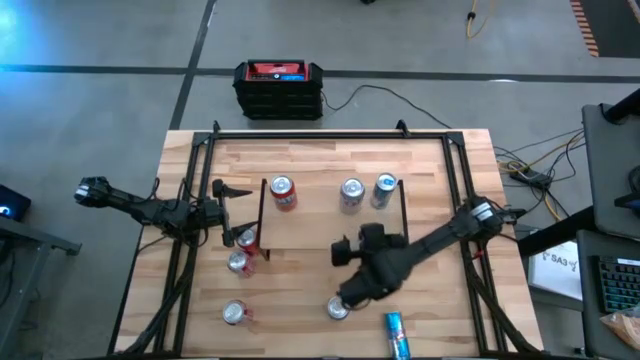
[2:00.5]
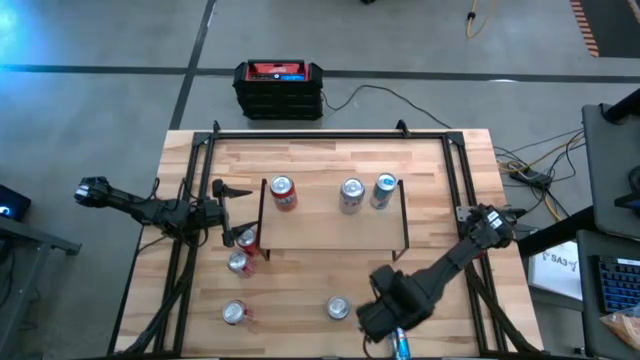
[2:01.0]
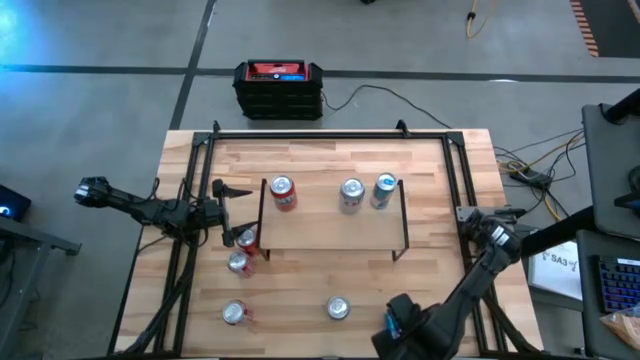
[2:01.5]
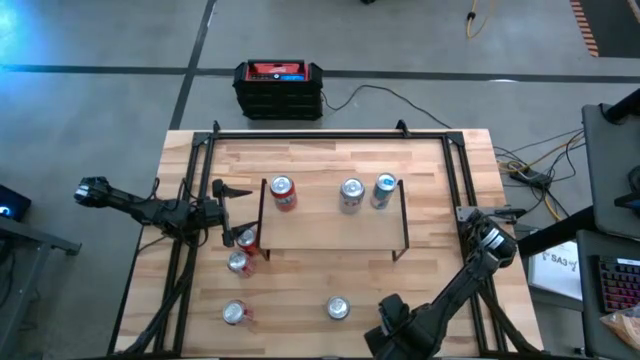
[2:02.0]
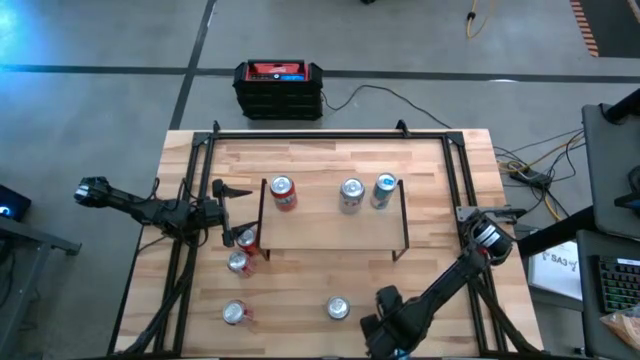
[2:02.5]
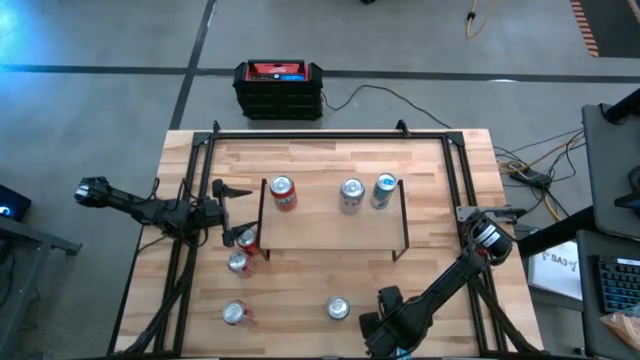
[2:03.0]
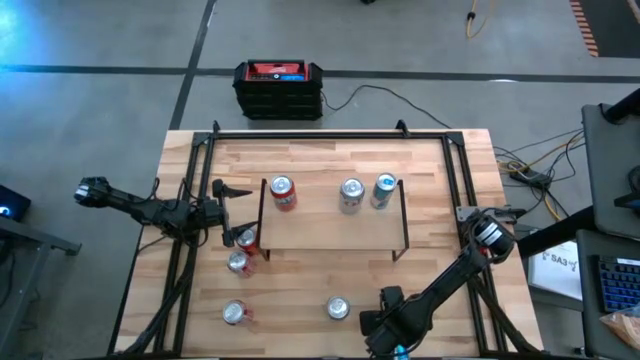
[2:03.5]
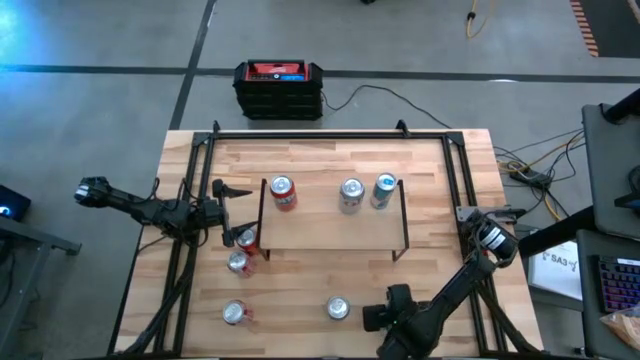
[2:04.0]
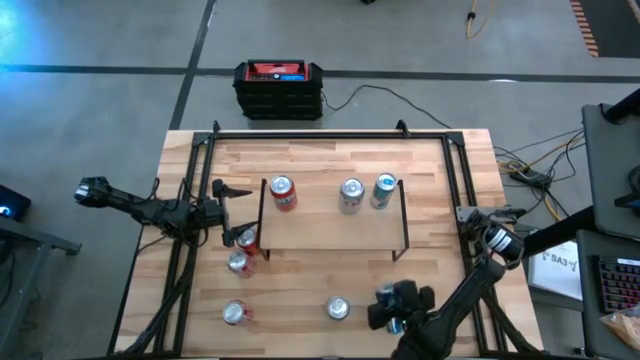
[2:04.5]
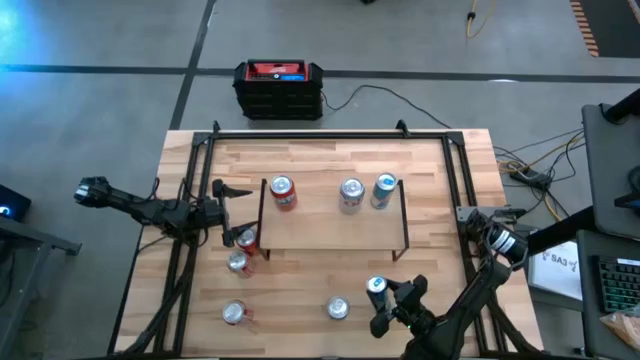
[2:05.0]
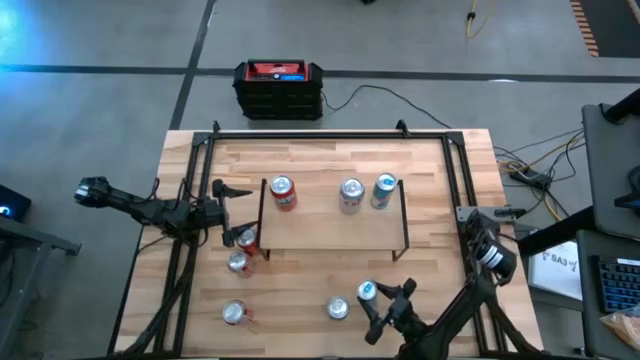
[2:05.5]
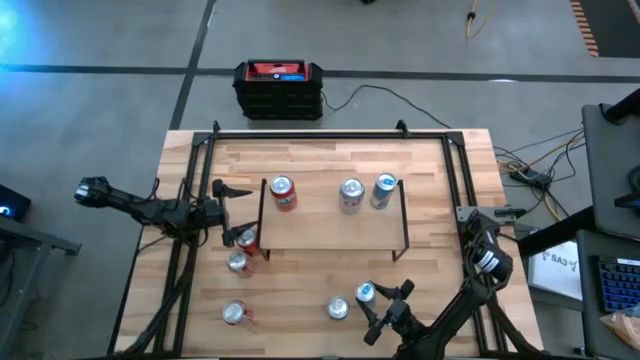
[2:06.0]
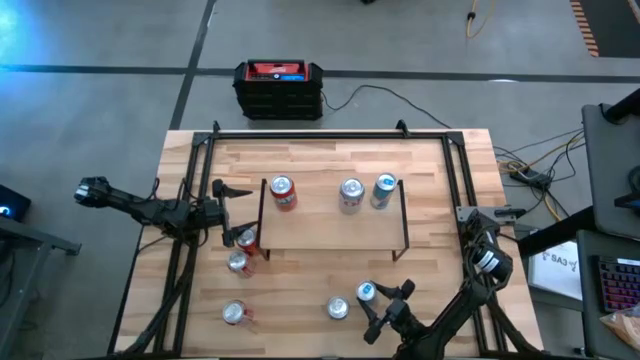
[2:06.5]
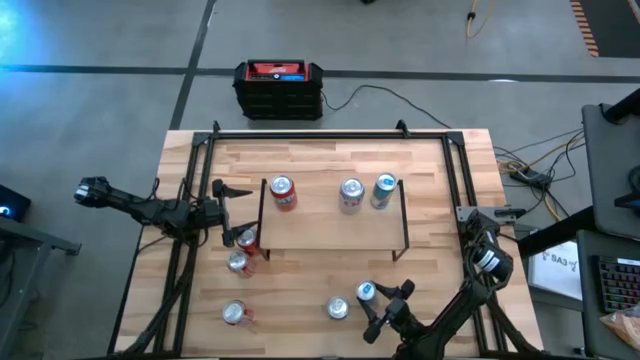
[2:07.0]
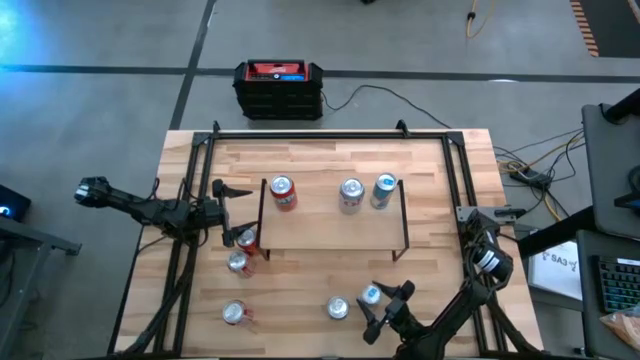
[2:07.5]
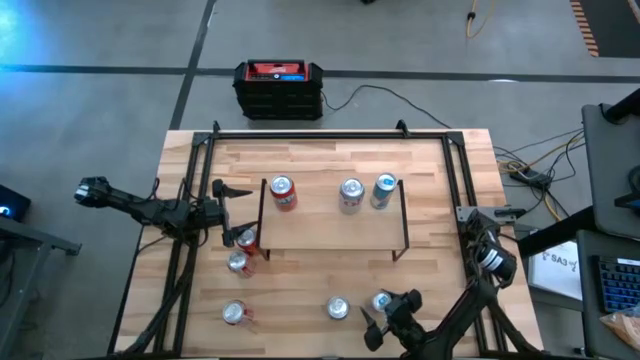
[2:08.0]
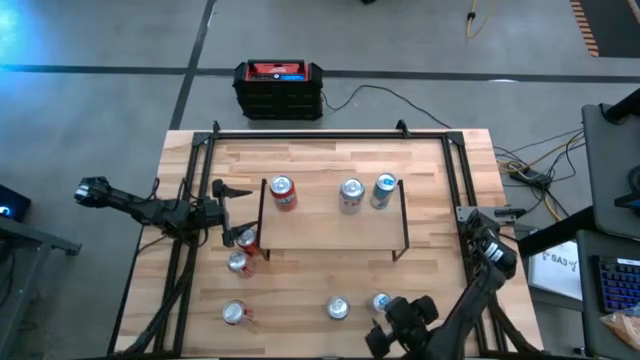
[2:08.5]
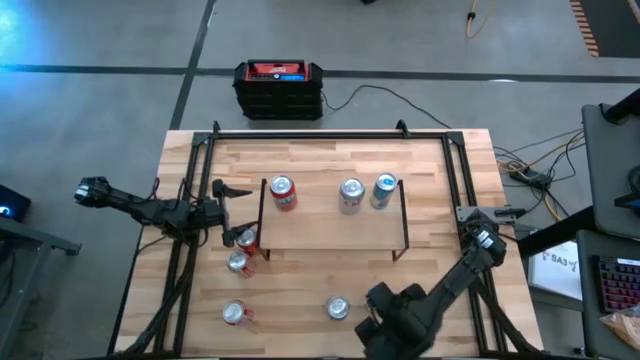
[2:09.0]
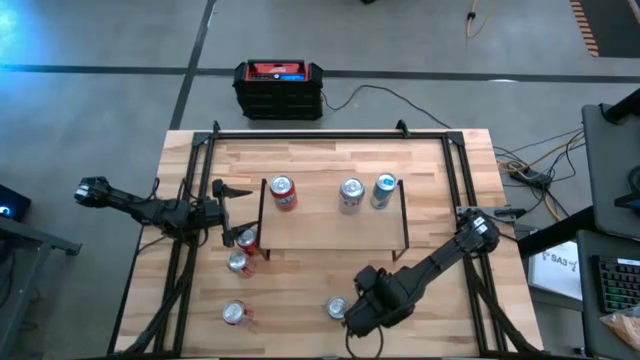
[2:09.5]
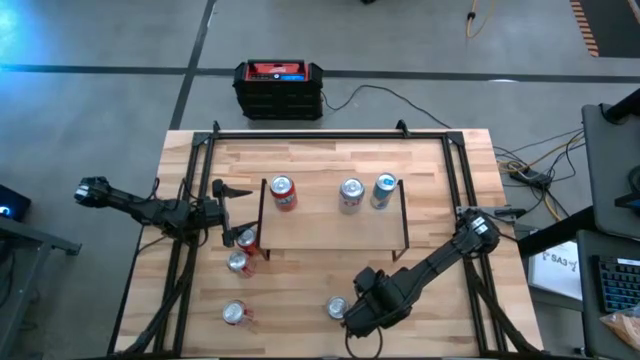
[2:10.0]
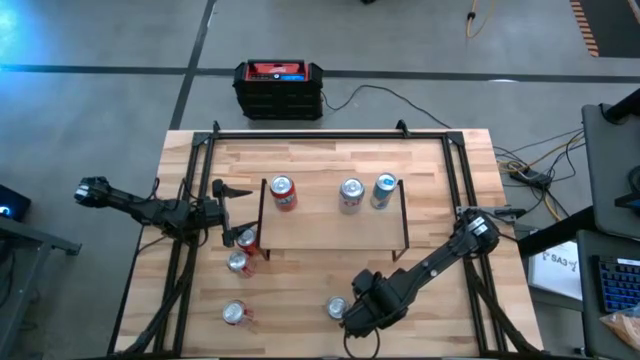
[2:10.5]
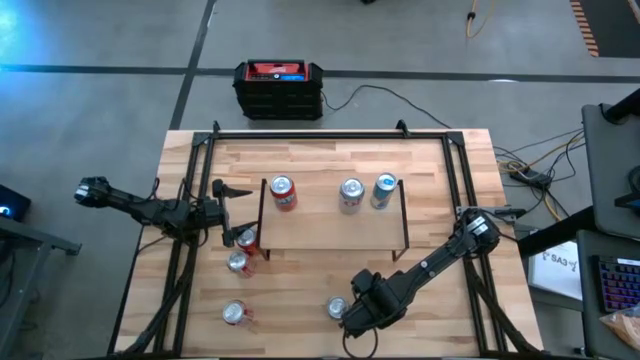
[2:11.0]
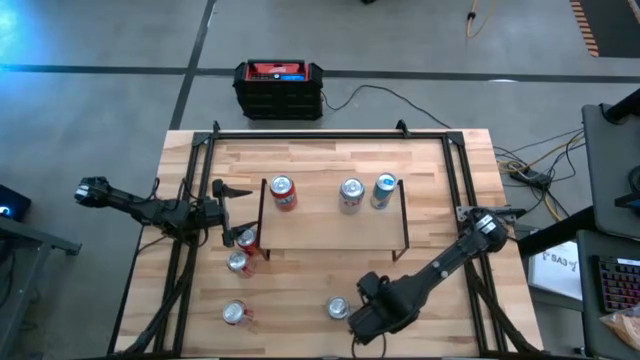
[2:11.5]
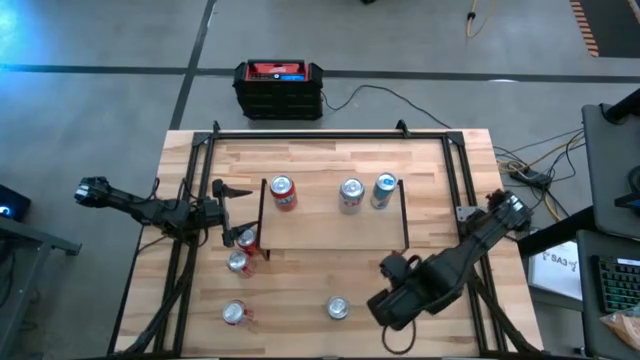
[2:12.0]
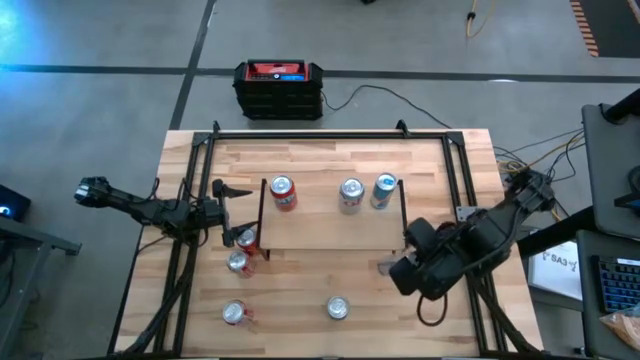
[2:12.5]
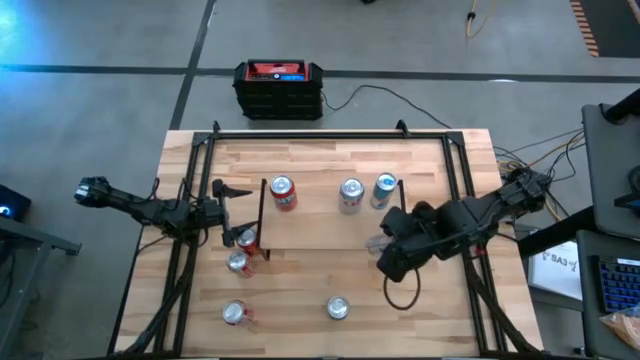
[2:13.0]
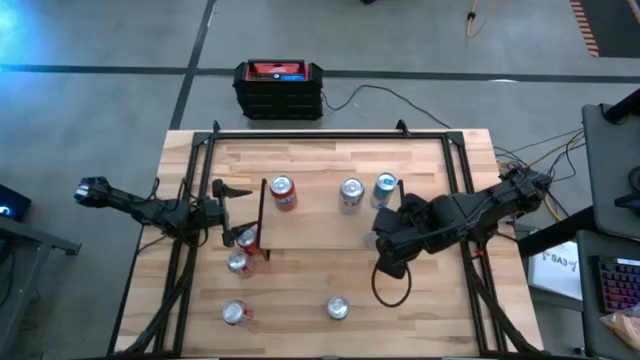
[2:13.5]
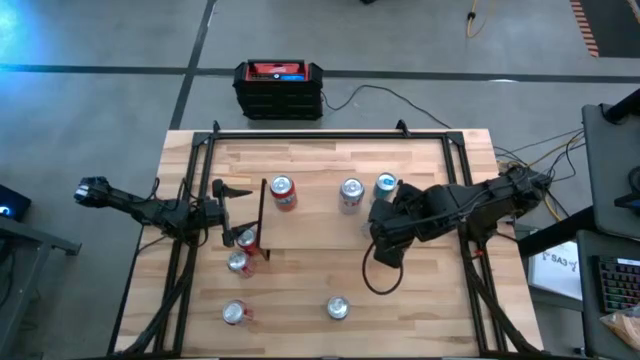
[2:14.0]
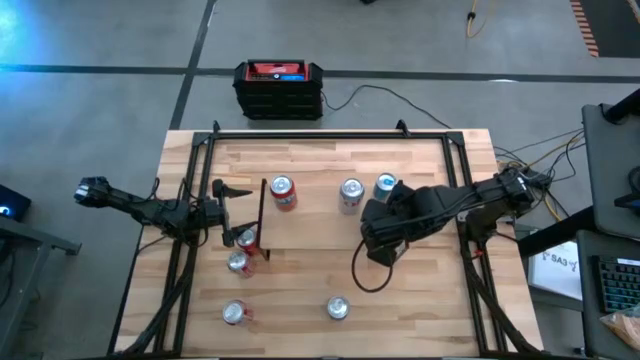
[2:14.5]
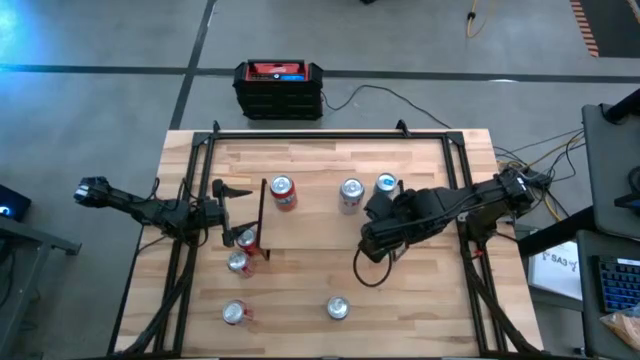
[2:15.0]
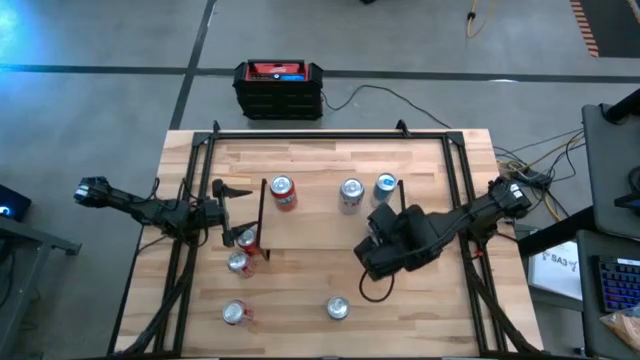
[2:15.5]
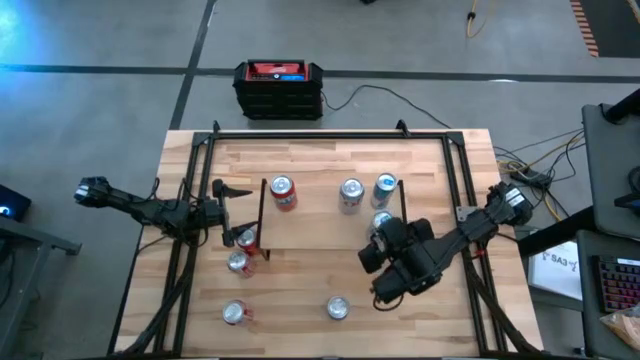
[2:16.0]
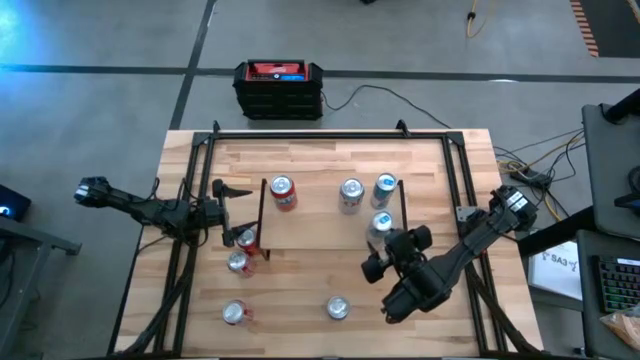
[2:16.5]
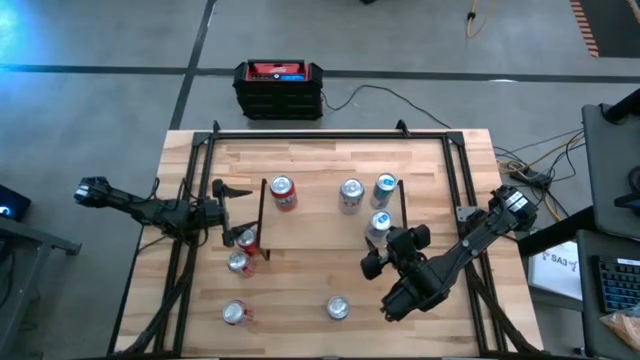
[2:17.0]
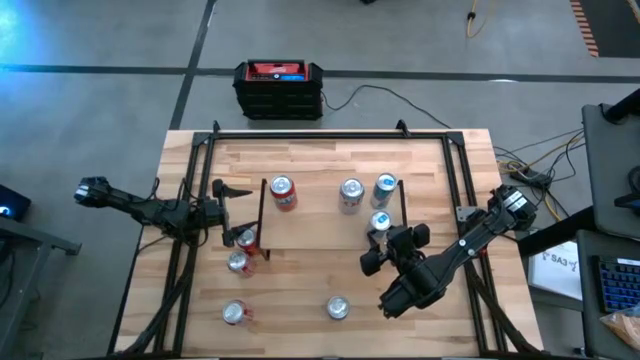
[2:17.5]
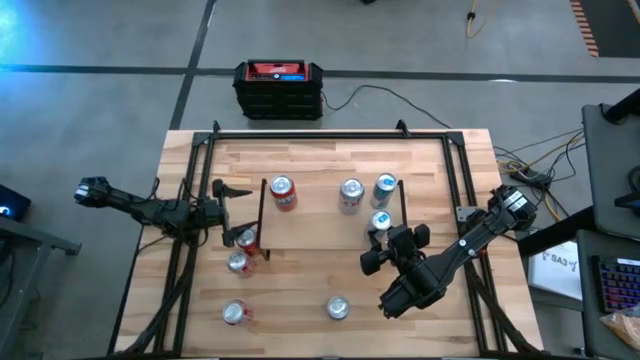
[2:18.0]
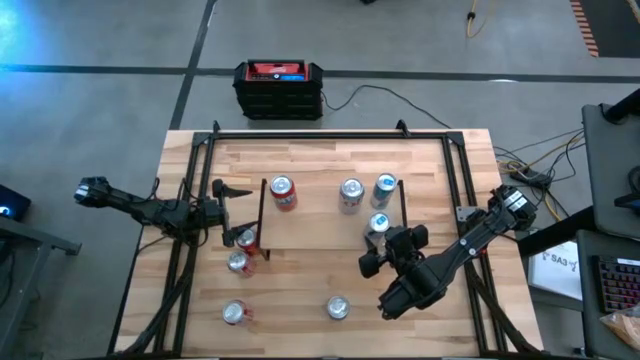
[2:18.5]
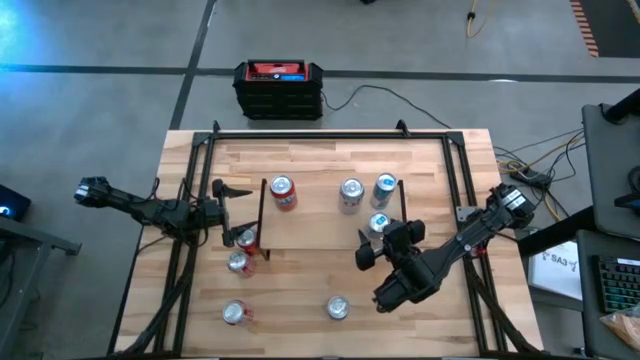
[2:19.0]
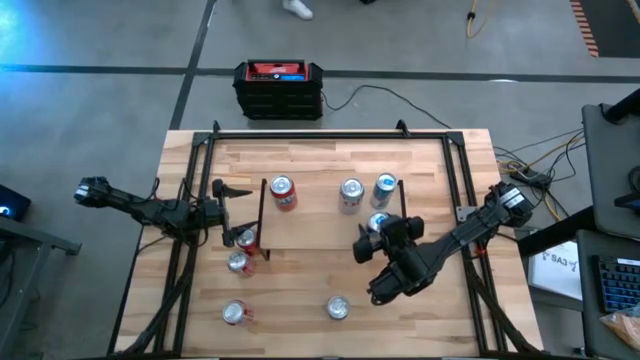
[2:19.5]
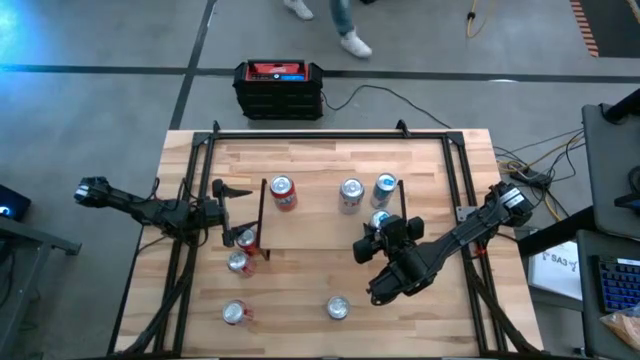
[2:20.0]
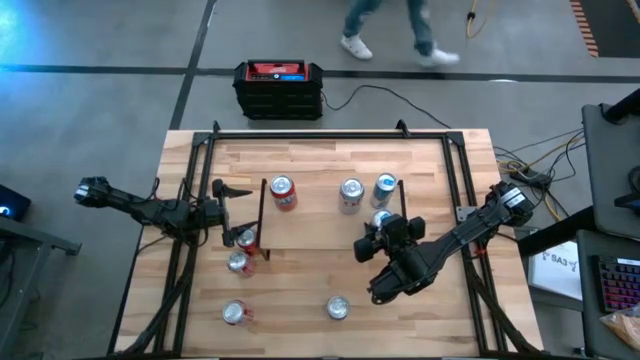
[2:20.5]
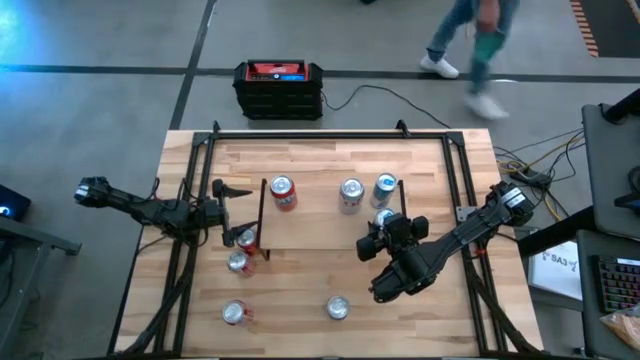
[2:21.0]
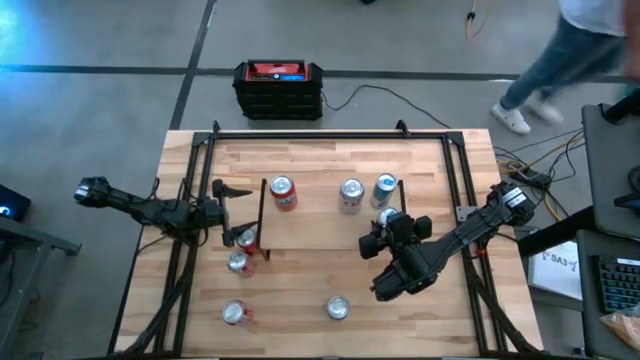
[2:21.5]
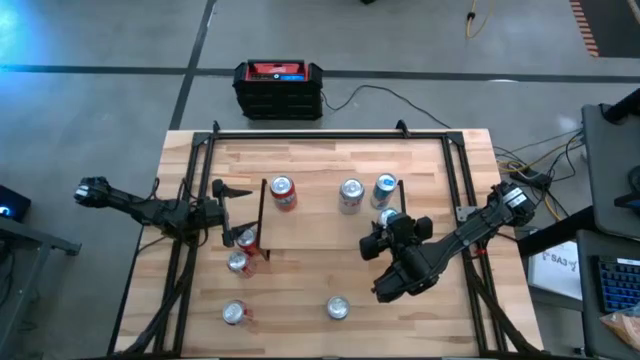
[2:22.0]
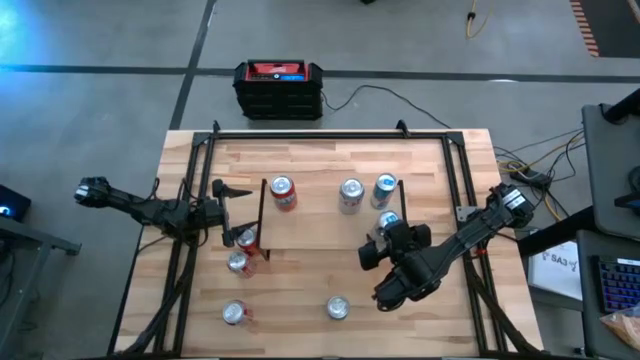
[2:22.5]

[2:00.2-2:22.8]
Task: Place canned beverage on shelf
Put the blue soda can on the shelf aligned with the other blue soda can
